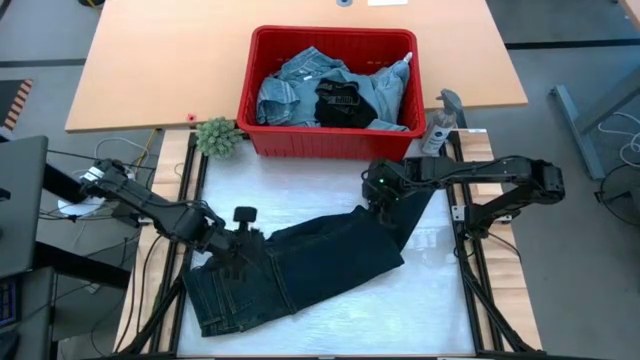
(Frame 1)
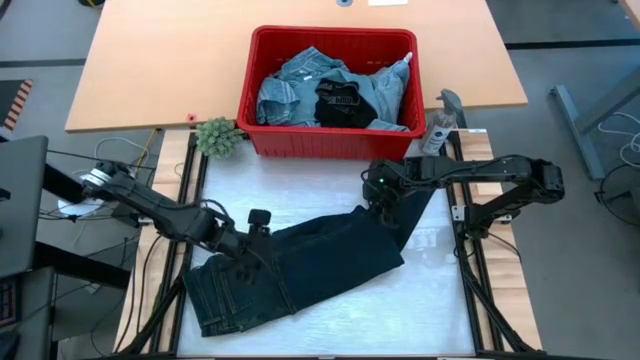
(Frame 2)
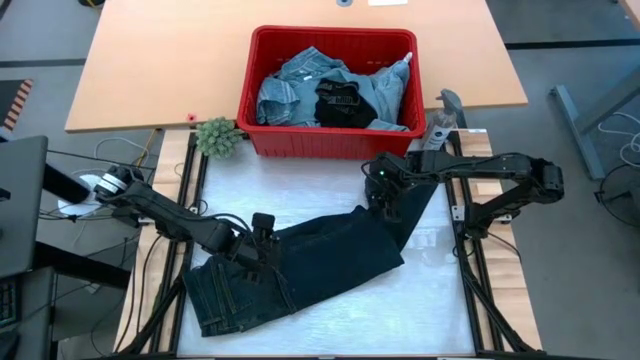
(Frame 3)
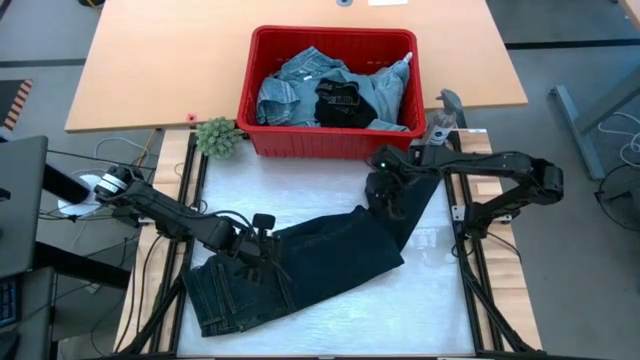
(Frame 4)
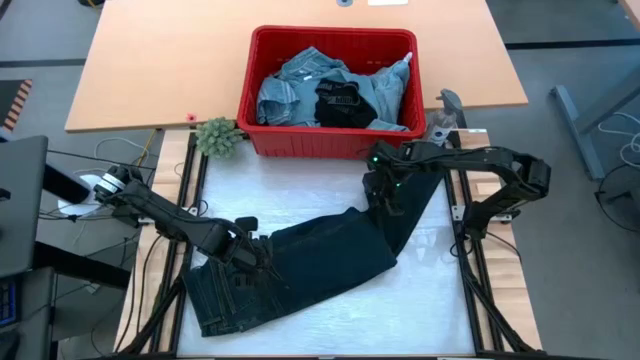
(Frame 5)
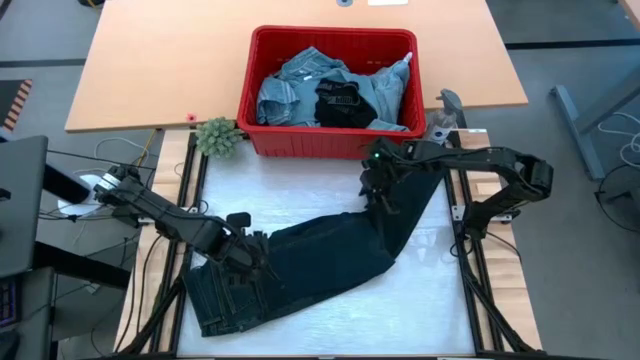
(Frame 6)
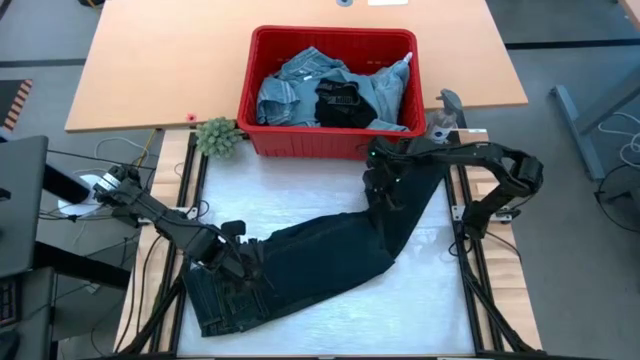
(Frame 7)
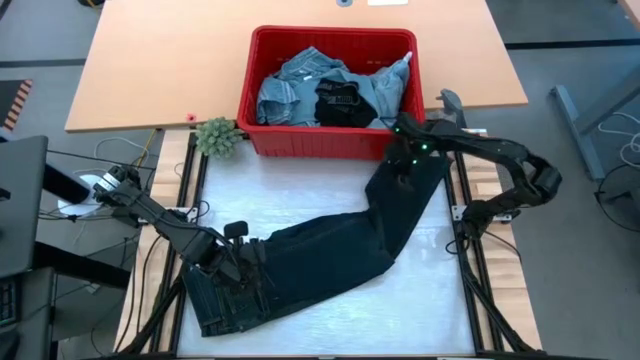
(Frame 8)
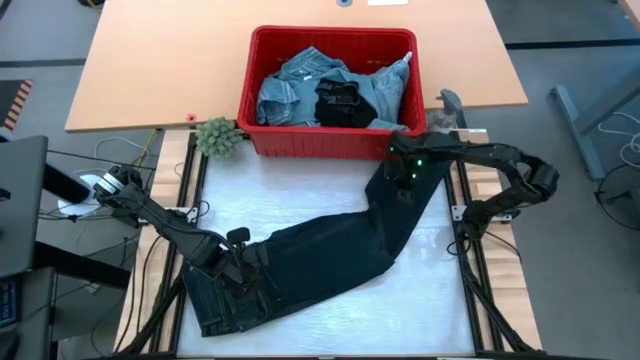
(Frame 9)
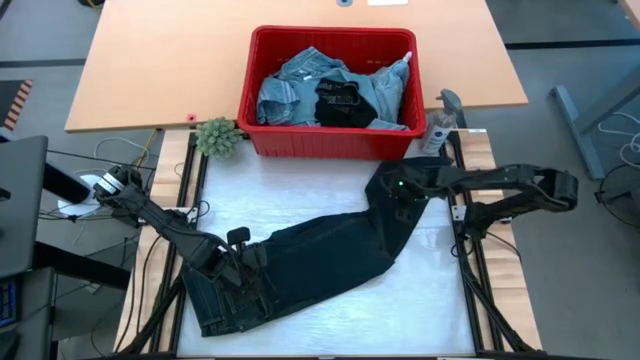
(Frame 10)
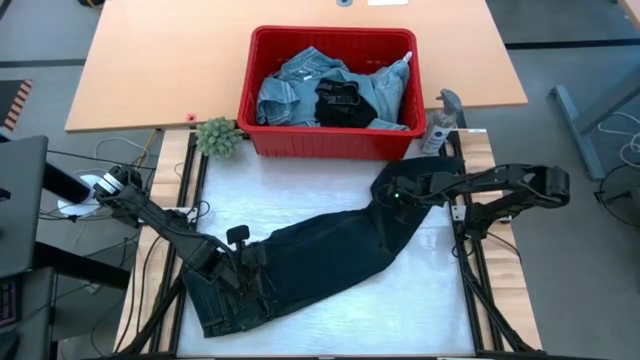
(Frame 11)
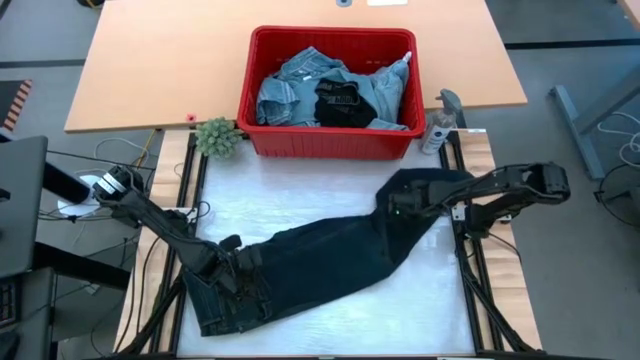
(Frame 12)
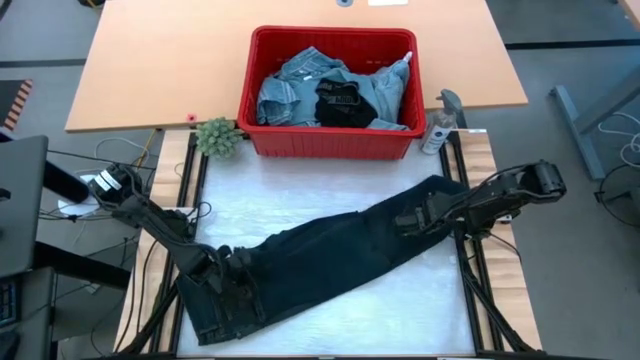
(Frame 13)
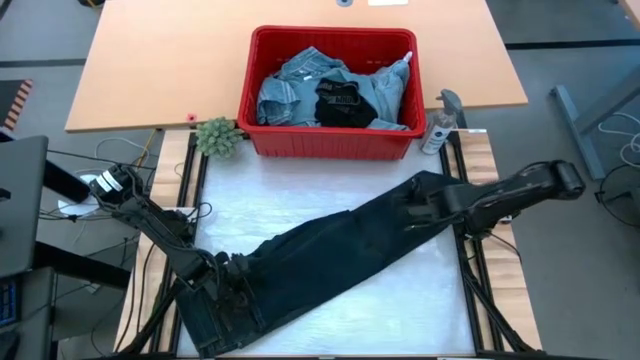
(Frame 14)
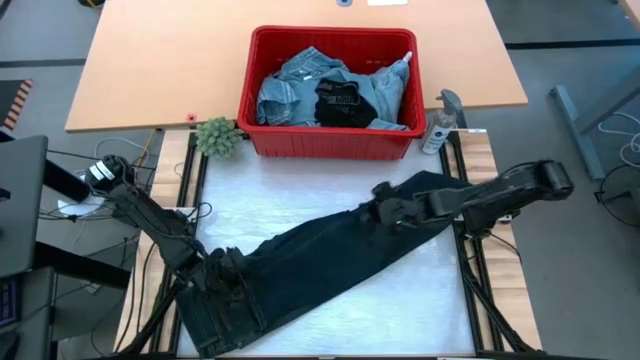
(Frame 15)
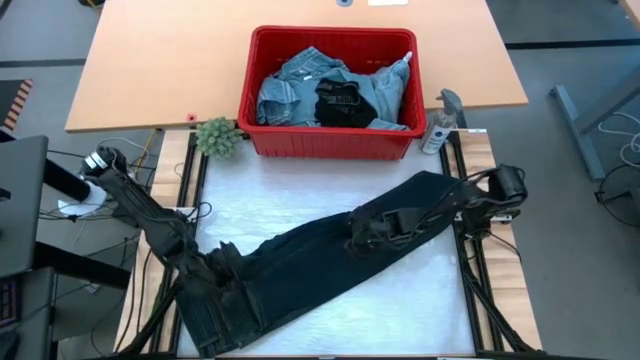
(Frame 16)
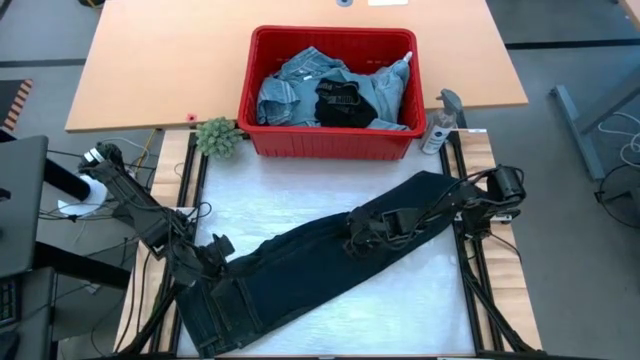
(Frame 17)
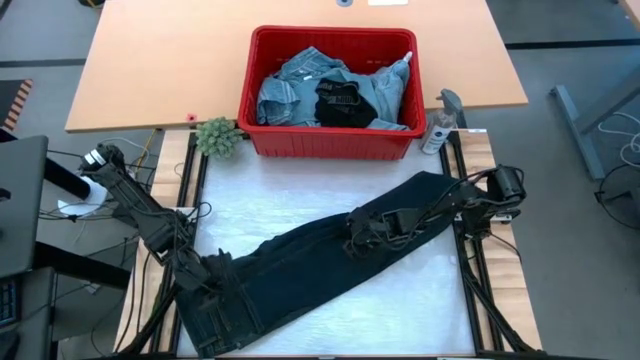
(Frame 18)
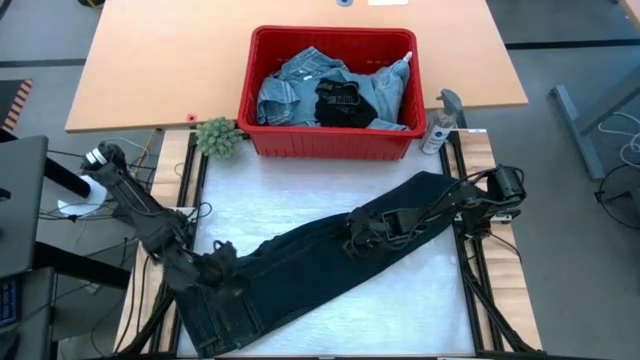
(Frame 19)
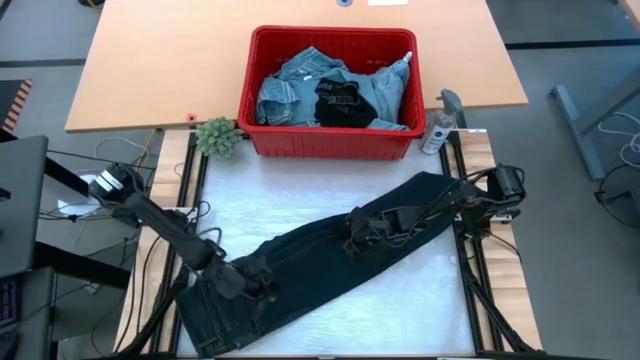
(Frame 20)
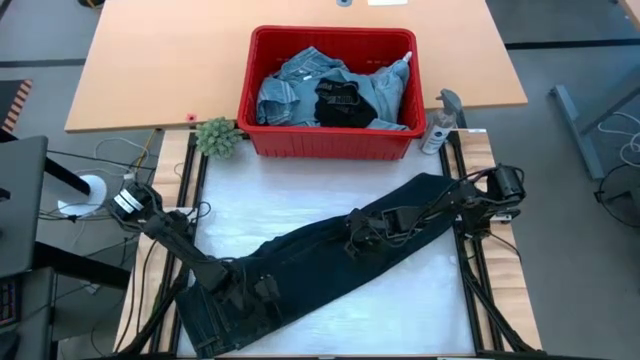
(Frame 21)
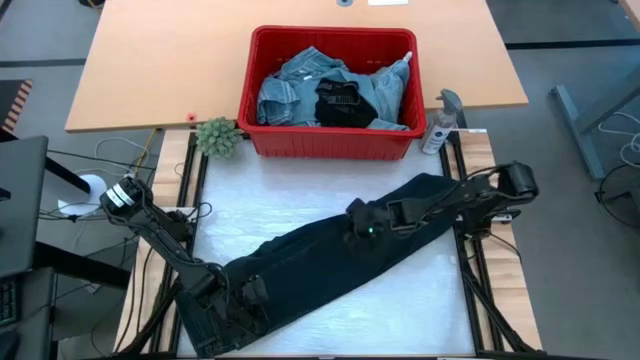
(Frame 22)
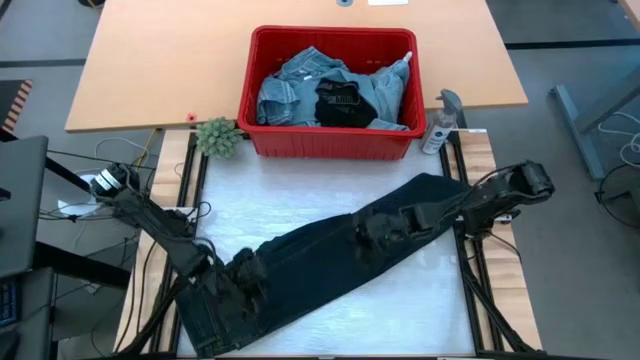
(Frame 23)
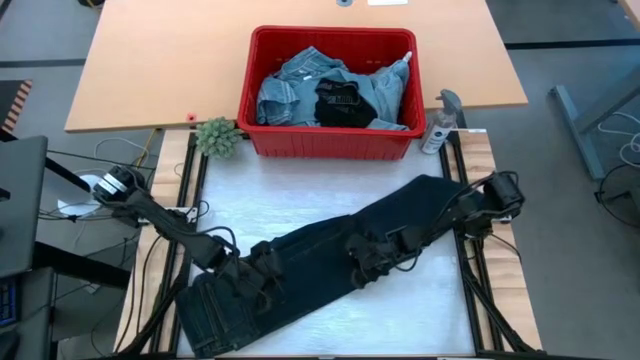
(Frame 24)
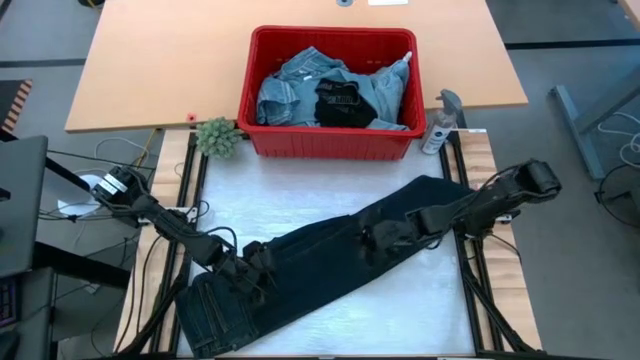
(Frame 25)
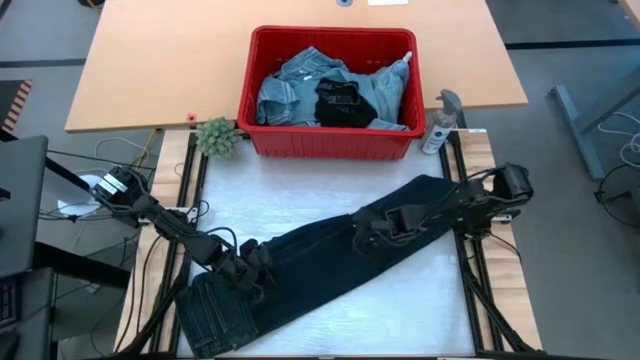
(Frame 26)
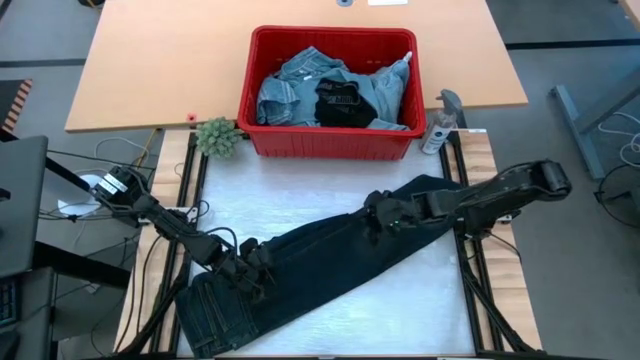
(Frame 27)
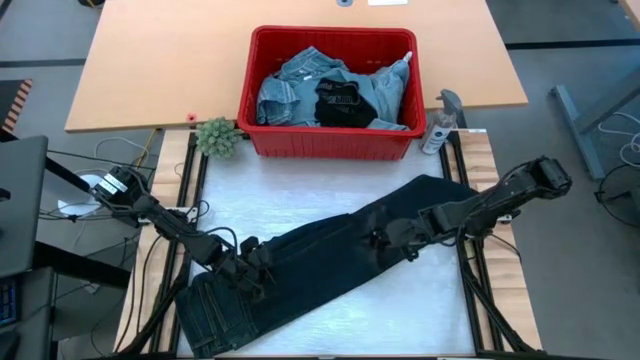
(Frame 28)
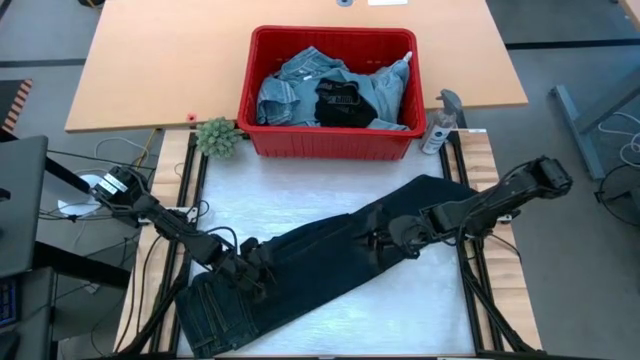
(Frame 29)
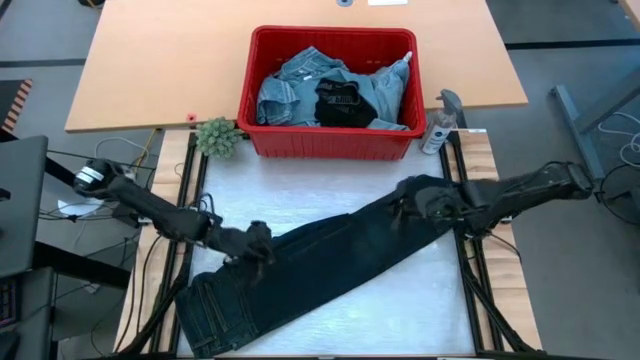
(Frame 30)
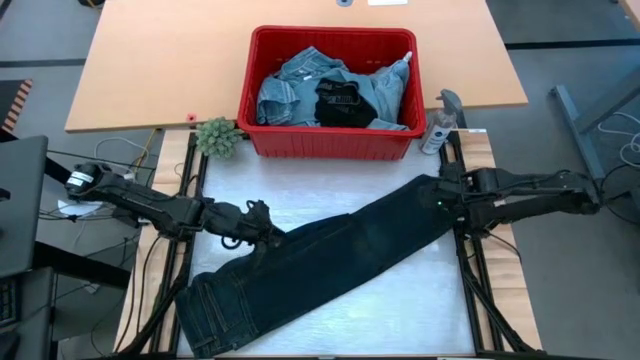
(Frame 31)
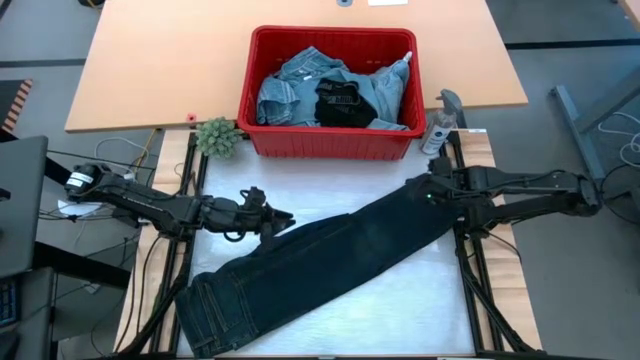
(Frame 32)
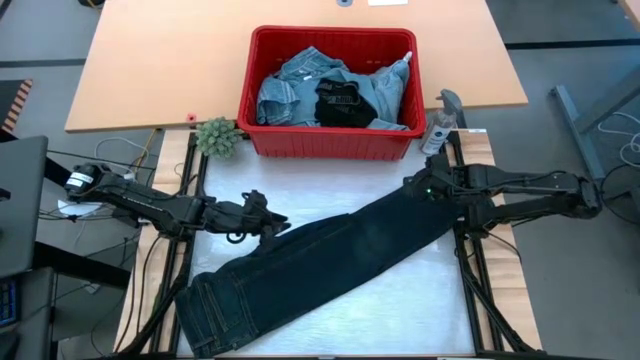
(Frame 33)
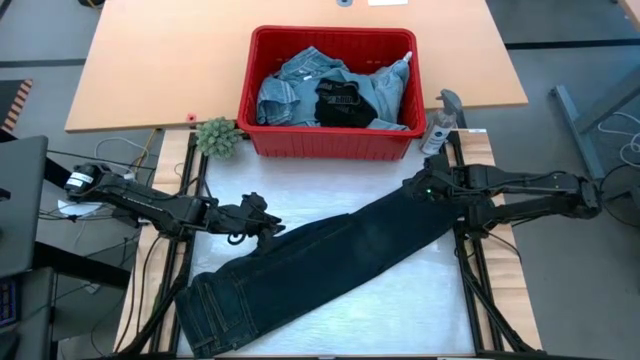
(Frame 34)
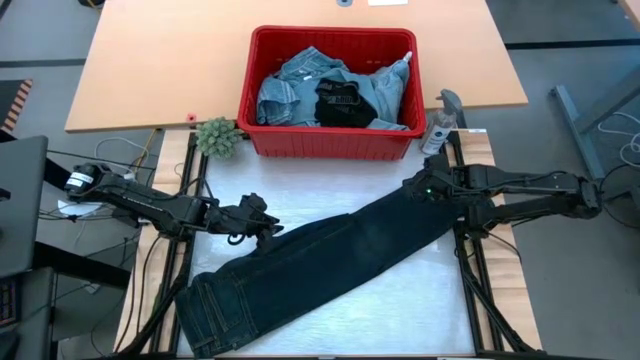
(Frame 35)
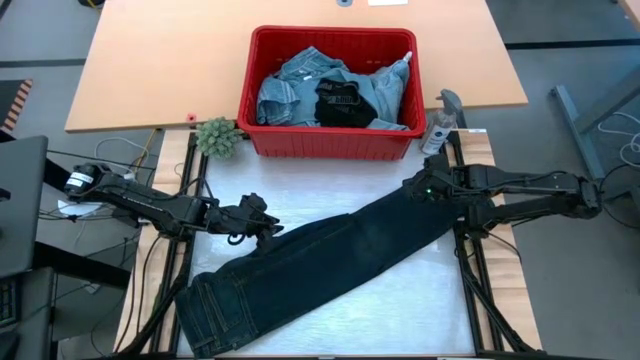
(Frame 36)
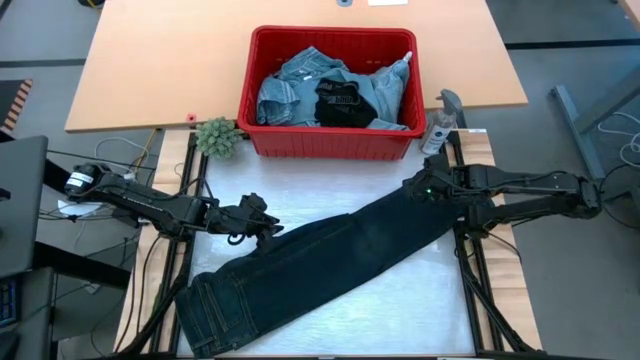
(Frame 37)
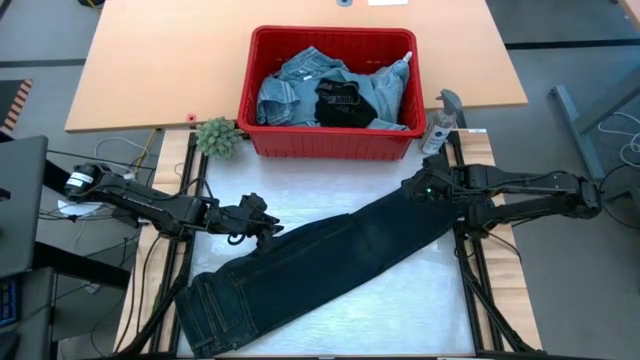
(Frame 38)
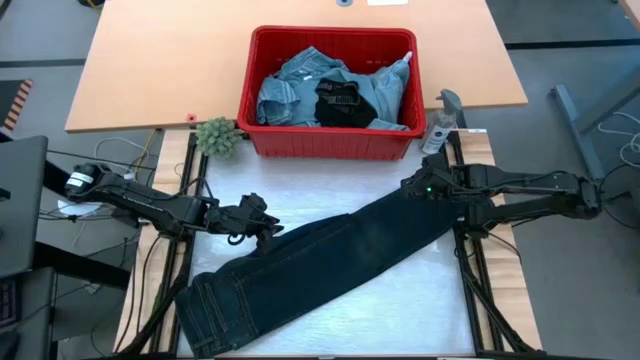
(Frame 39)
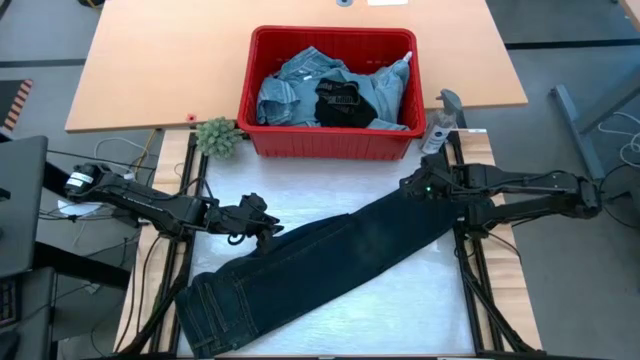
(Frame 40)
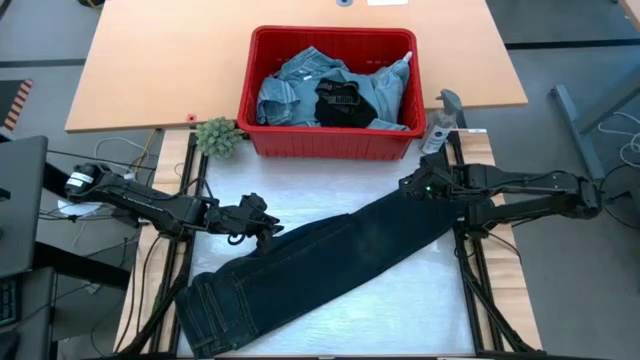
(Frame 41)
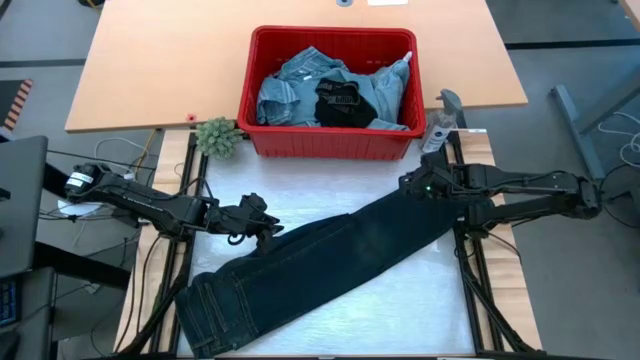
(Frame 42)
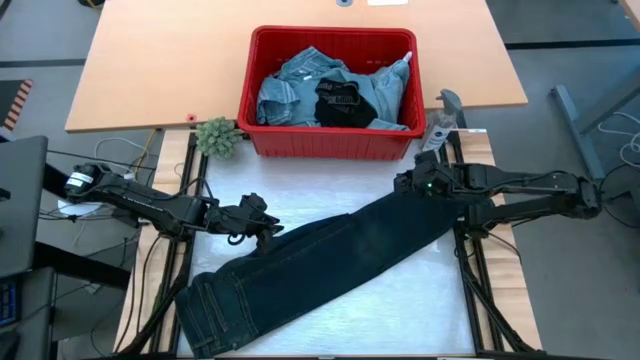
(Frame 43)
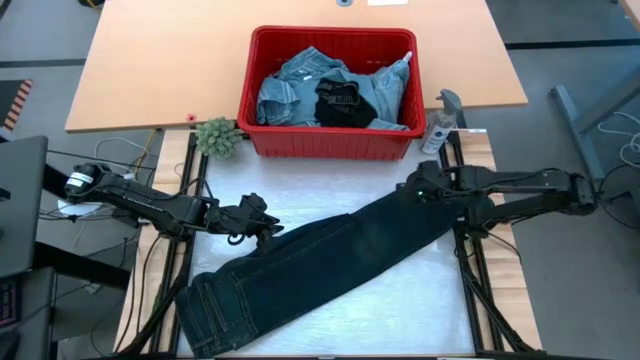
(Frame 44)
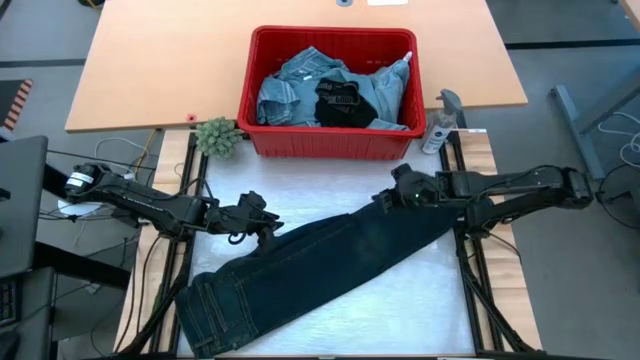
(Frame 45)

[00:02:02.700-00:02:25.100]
Task: Fold Laundry from Bin
Fold the black pants
